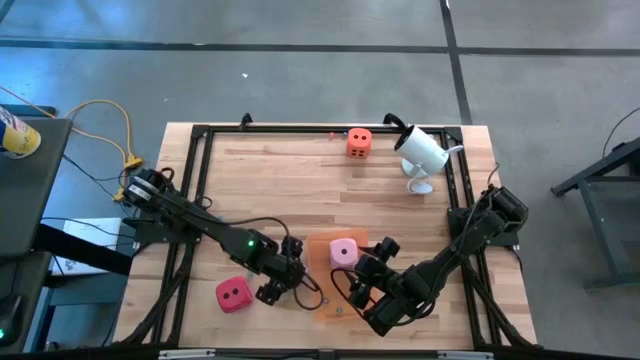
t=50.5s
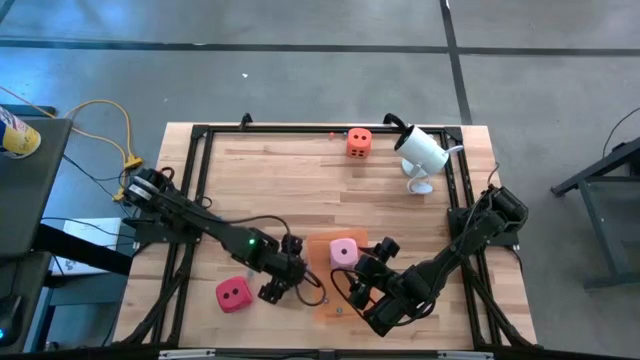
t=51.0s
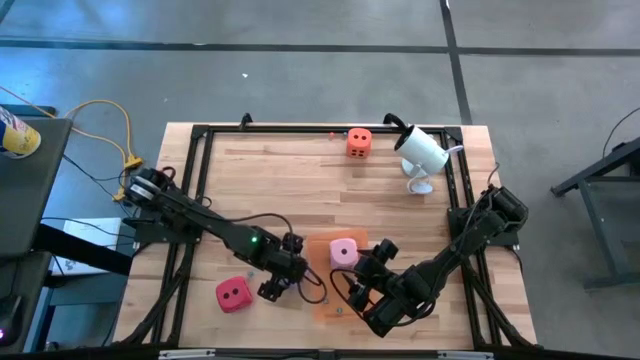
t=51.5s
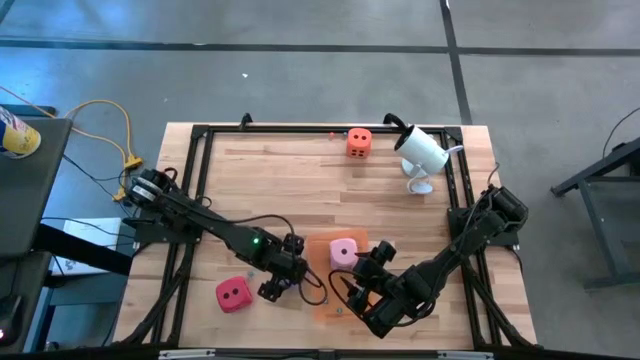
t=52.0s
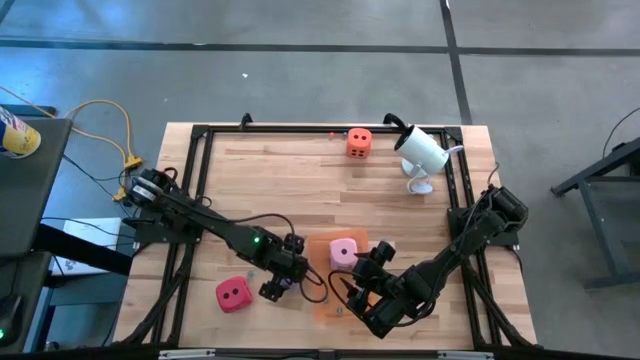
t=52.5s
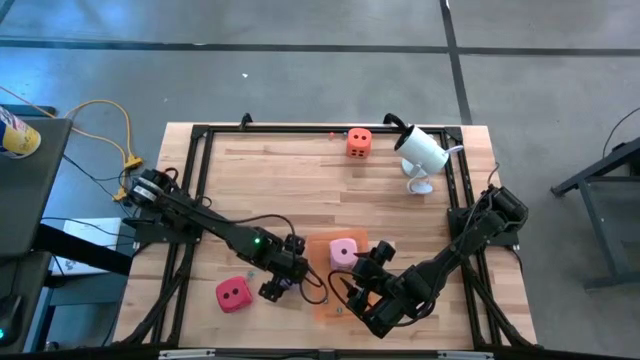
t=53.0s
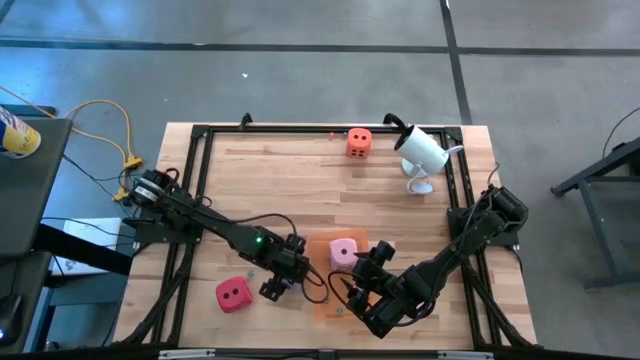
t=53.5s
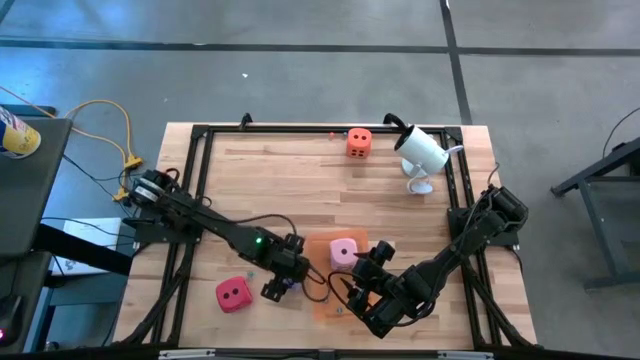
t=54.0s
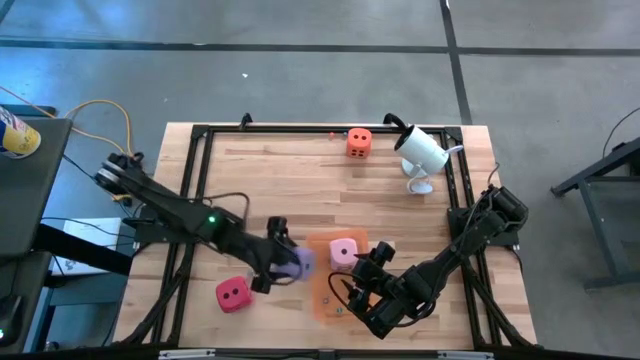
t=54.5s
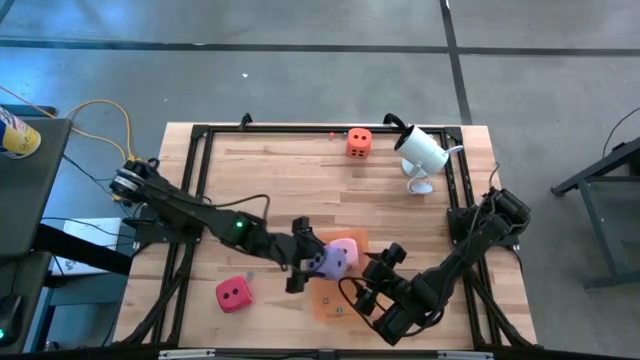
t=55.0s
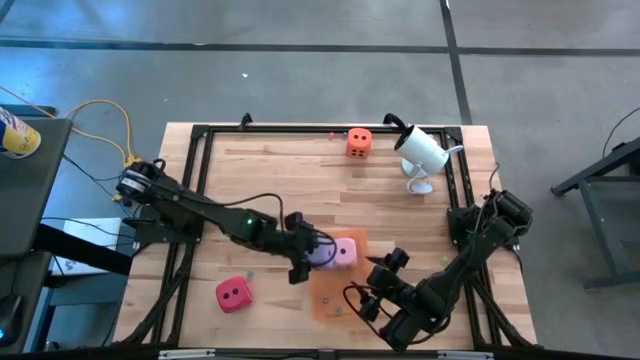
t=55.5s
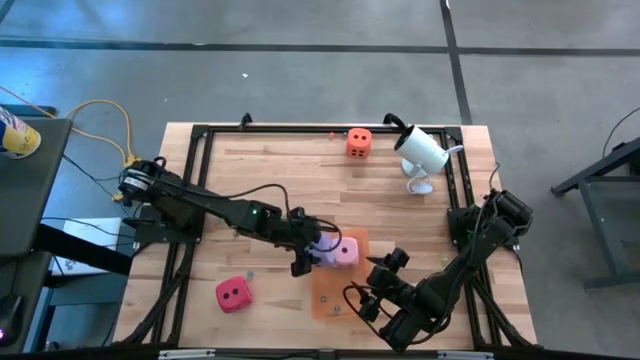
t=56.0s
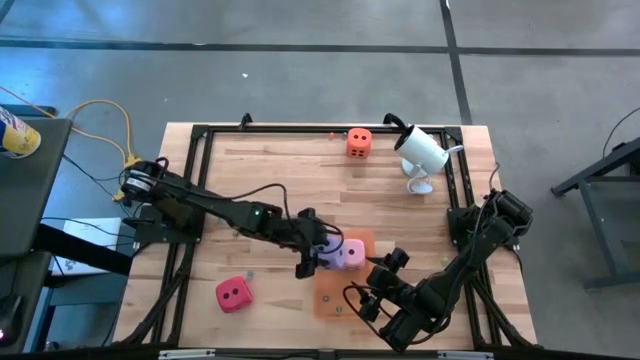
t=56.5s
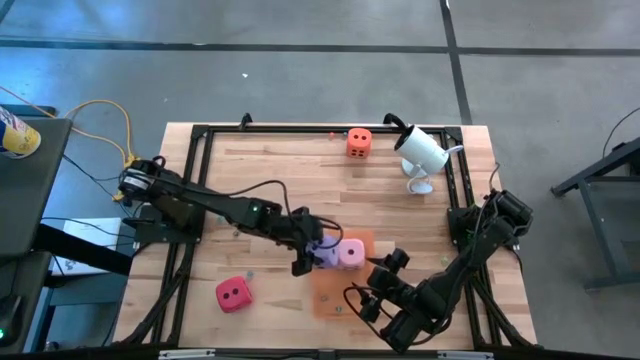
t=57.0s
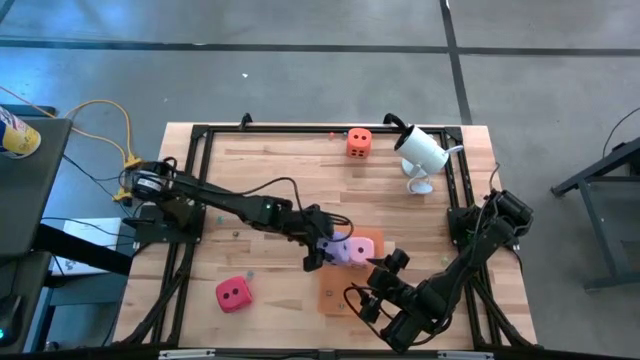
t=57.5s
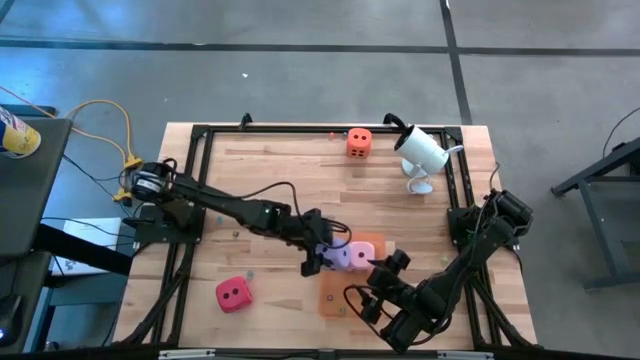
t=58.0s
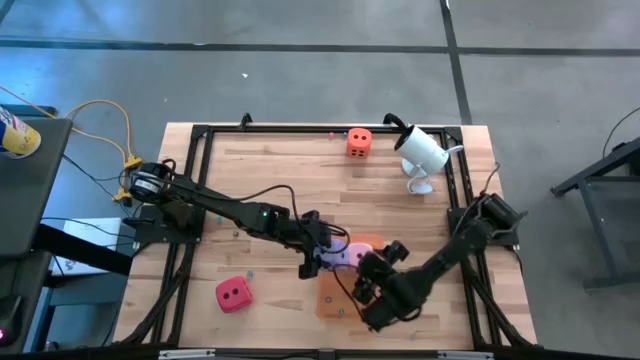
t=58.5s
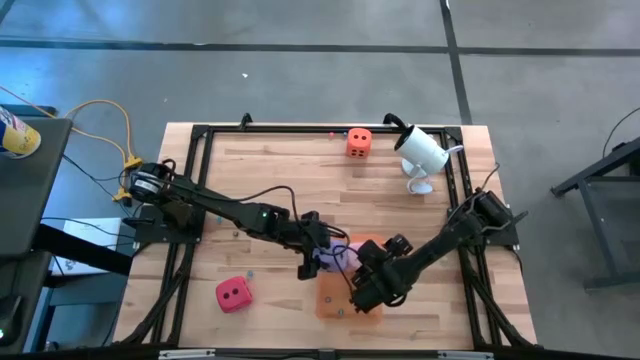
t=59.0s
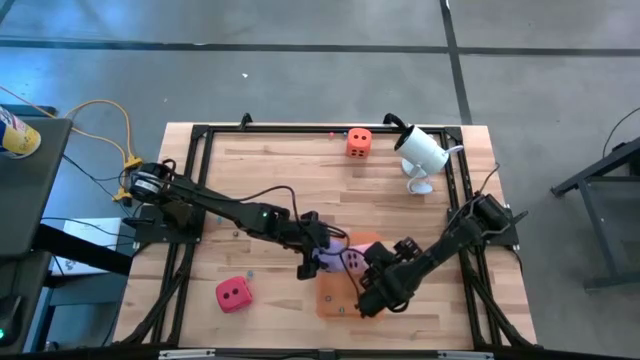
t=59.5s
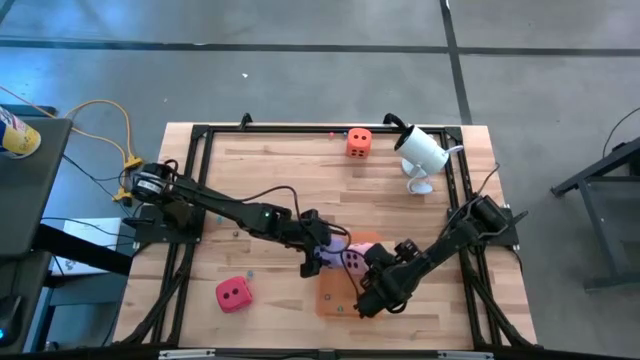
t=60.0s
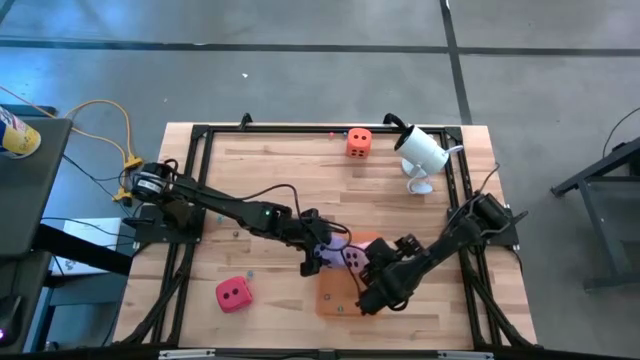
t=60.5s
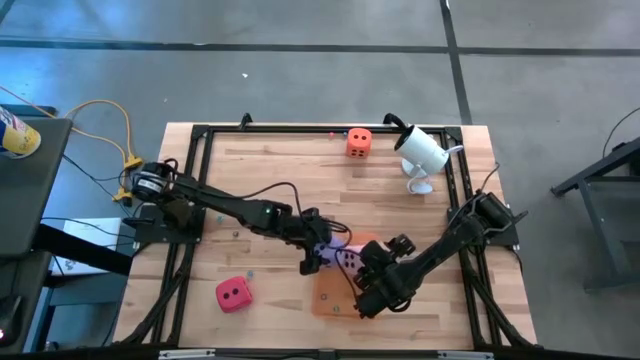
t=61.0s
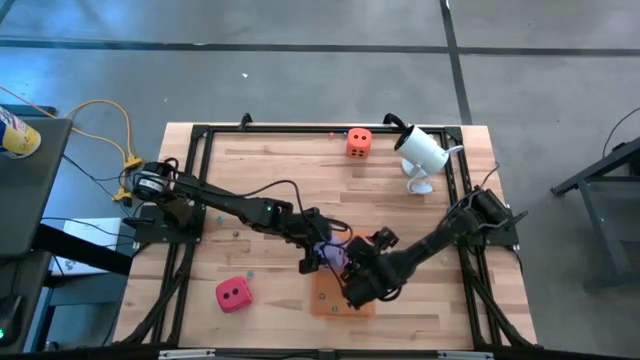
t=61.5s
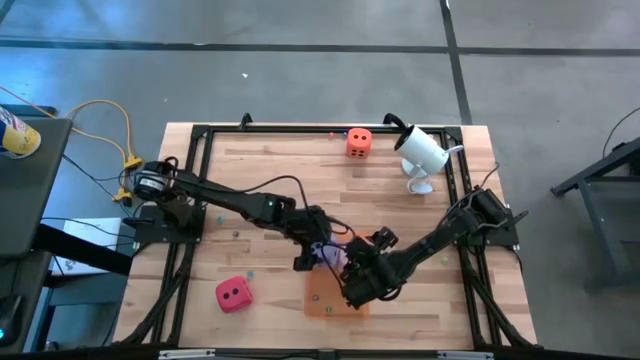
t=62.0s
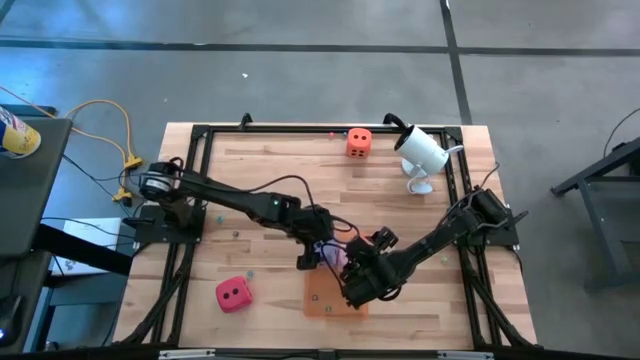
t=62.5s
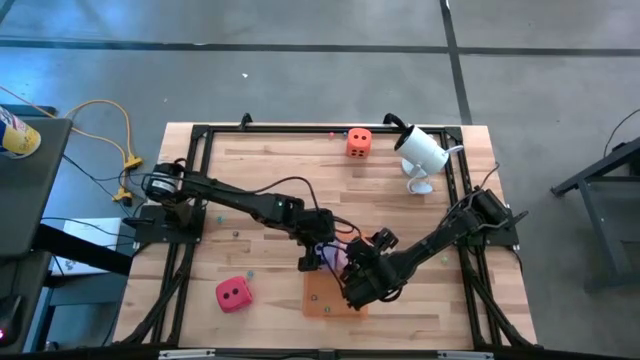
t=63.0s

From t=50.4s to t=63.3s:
Task: Pick & Place Dice
Put the large purple dice into the orange bin

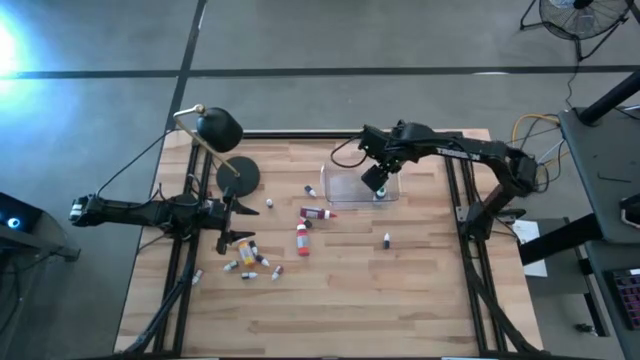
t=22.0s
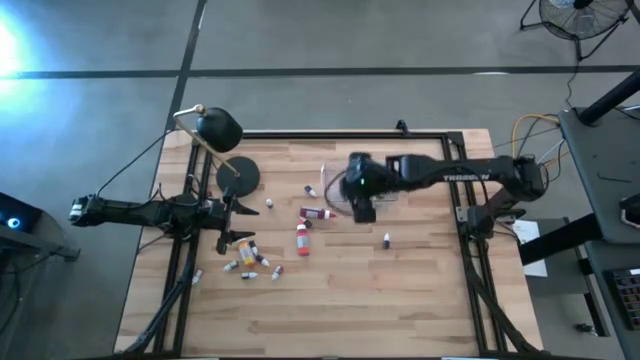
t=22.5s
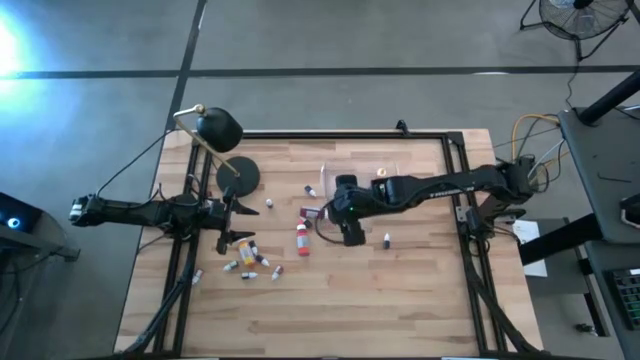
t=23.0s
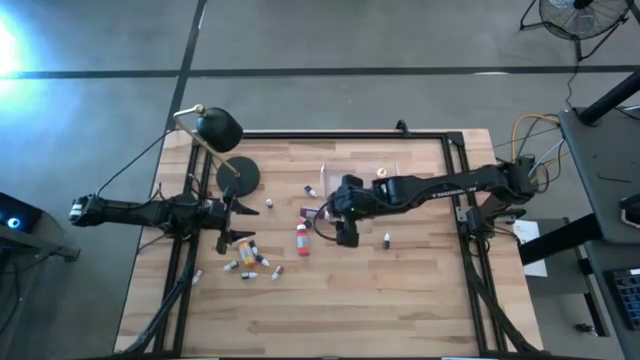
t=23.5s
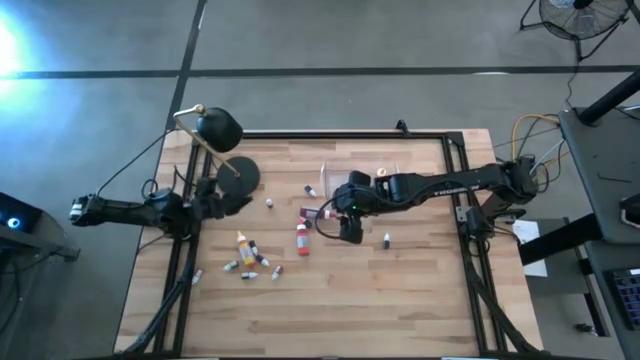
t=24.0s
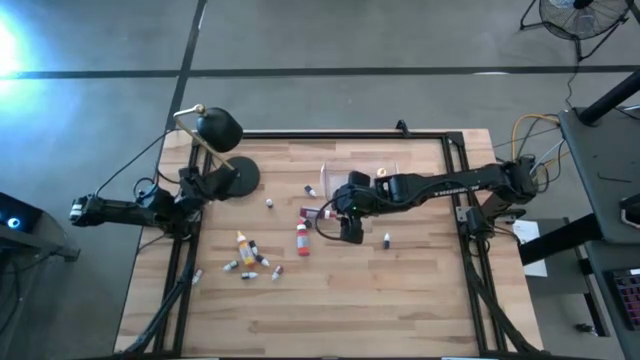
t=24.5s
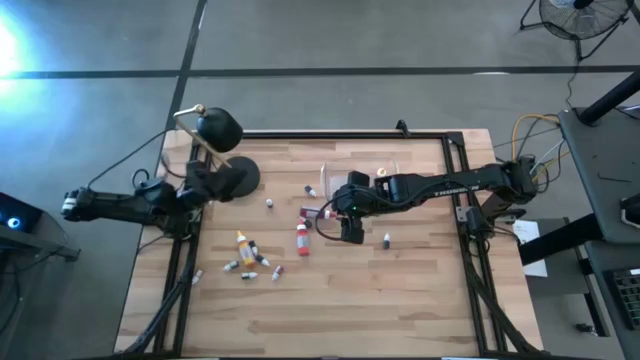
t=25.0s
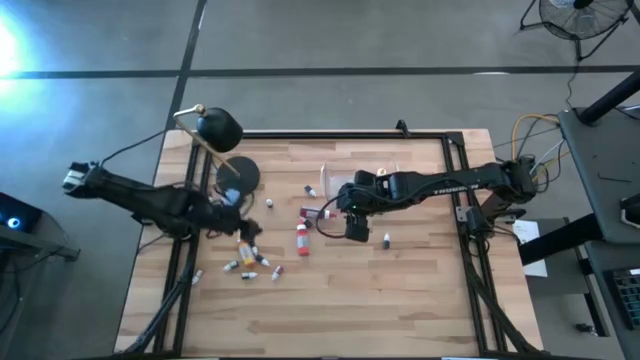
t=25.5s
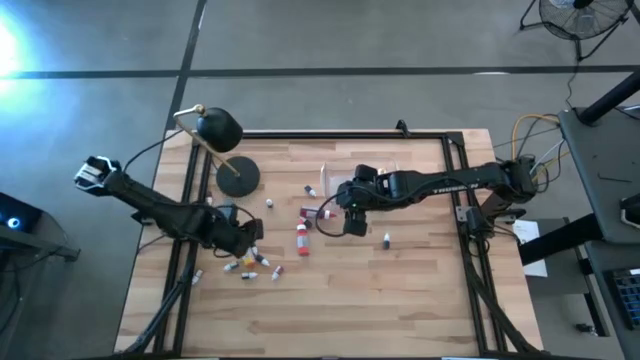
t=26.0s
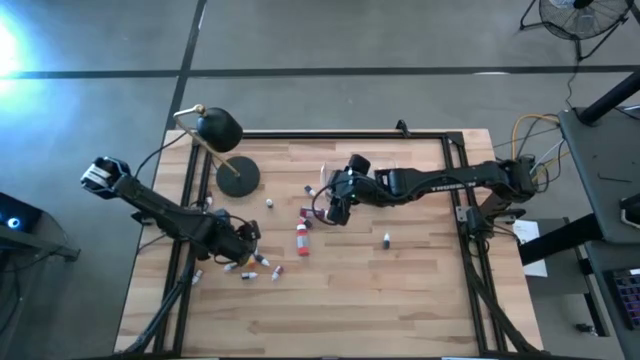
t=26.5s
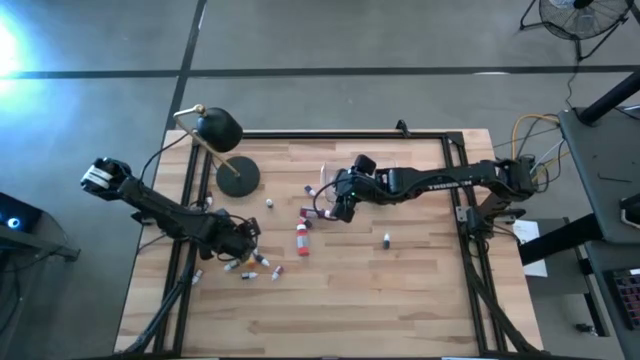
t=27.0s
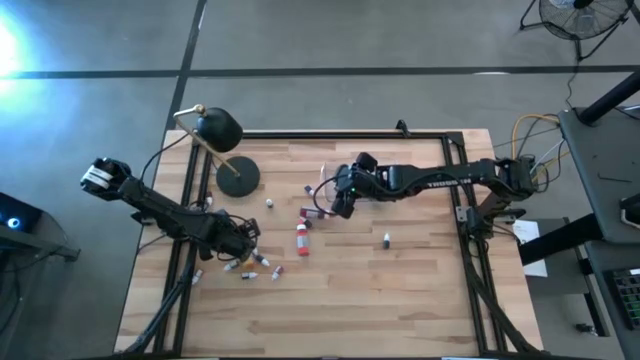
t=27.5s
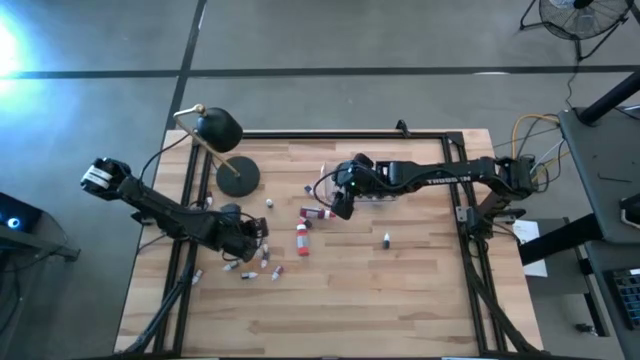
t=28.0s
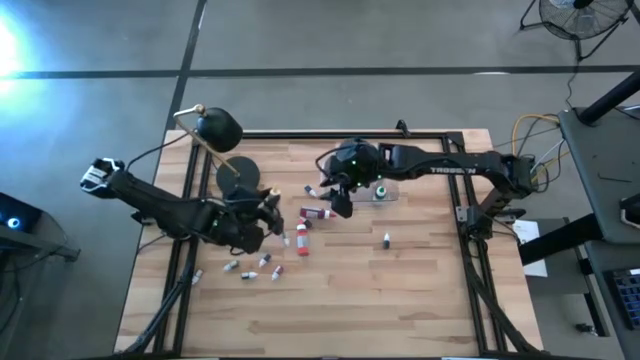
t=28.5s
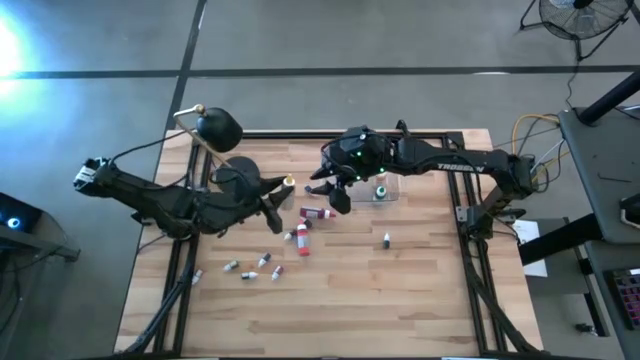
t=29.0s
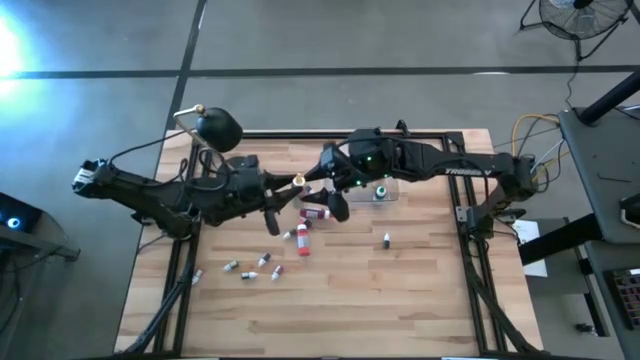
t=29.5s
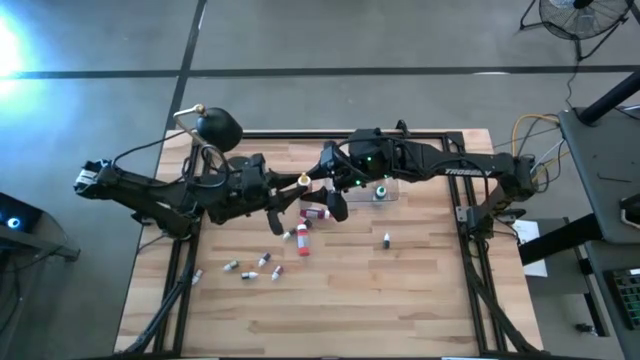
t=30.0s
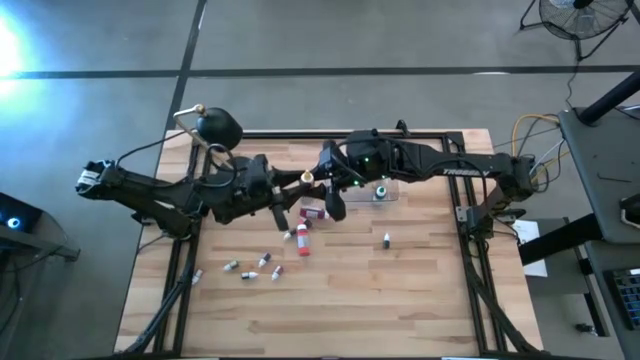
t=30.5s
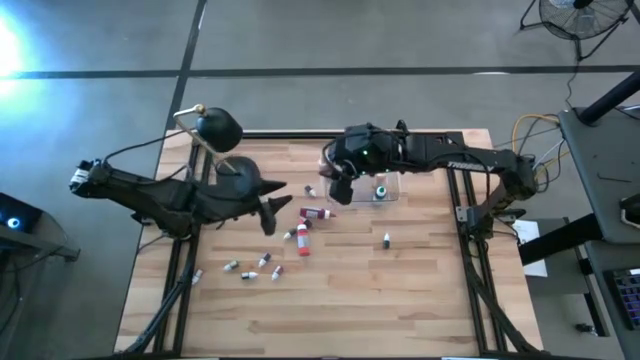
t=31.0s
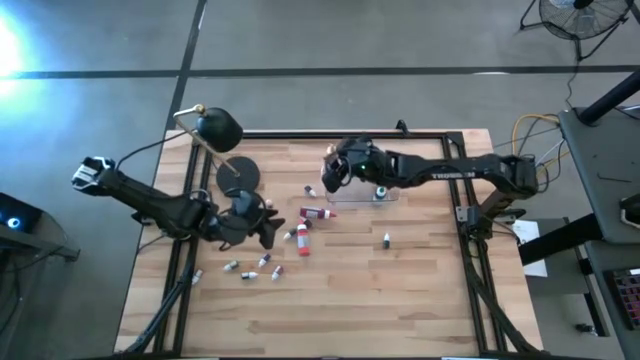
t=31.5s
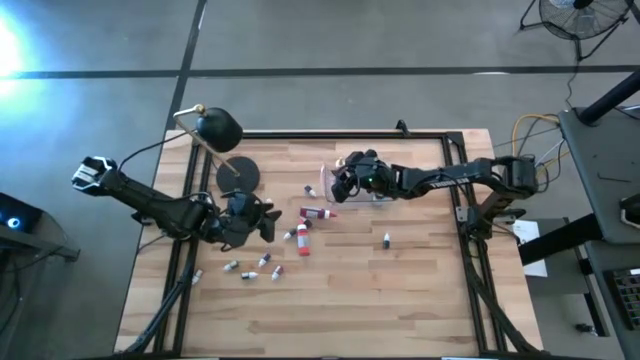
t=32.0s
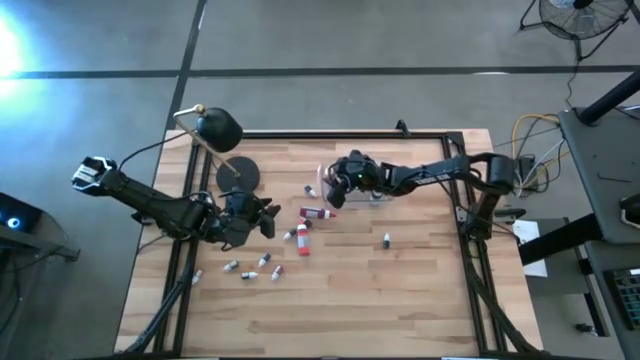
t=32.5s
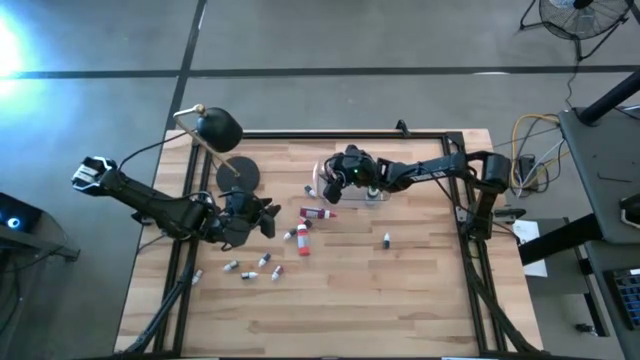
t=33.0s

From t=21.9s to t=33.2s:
Task: Pick & Place food coloring
Put the large yellow food coloring bottle into the transparent bin
